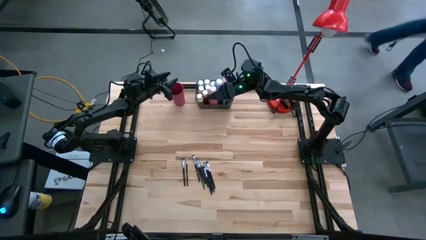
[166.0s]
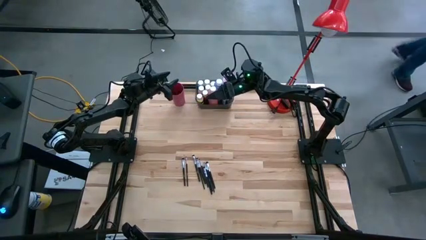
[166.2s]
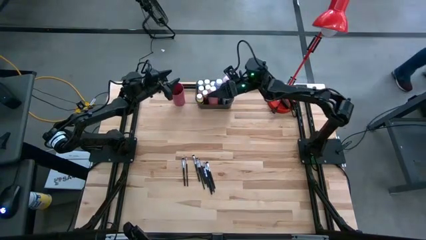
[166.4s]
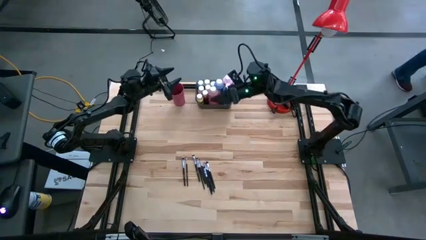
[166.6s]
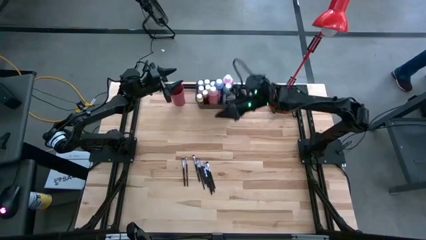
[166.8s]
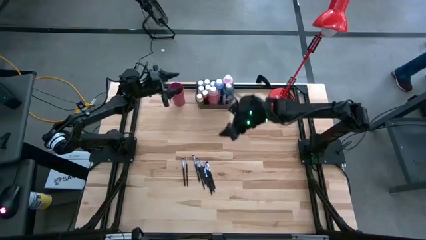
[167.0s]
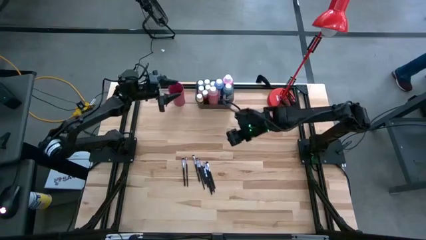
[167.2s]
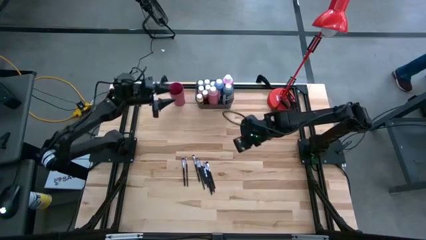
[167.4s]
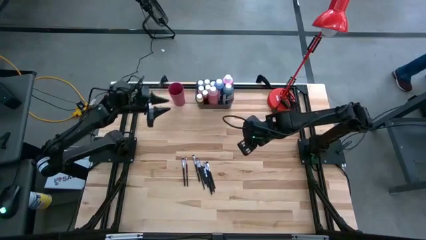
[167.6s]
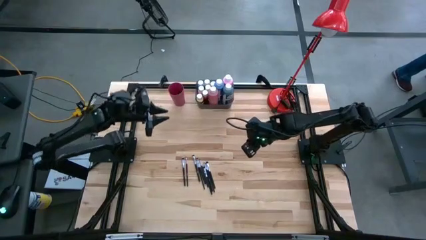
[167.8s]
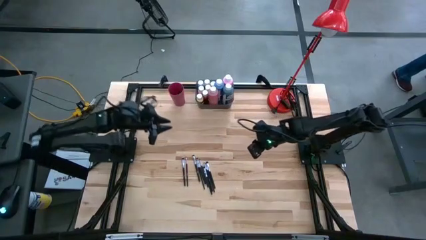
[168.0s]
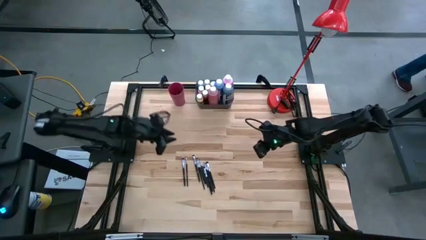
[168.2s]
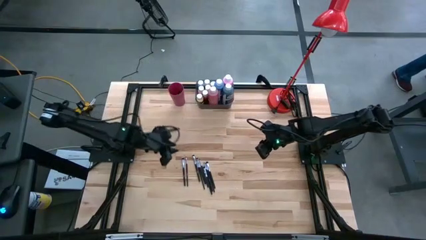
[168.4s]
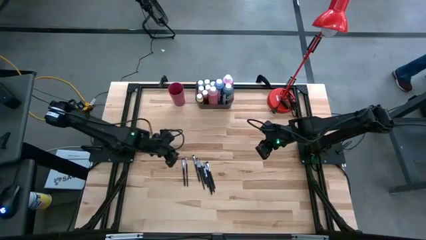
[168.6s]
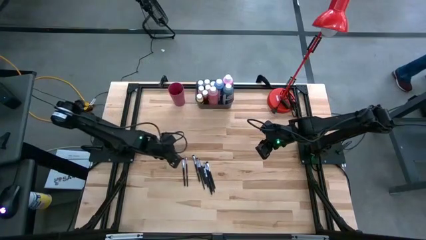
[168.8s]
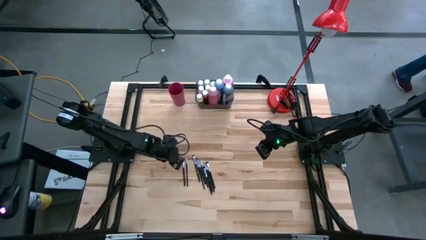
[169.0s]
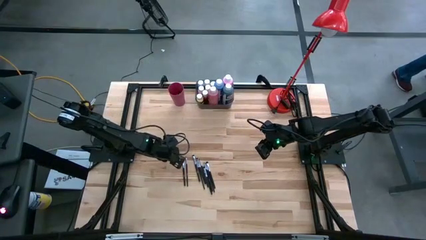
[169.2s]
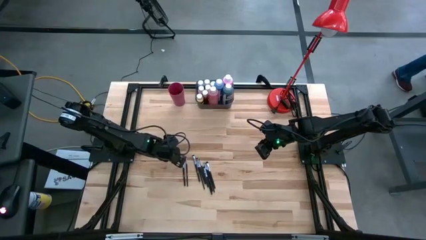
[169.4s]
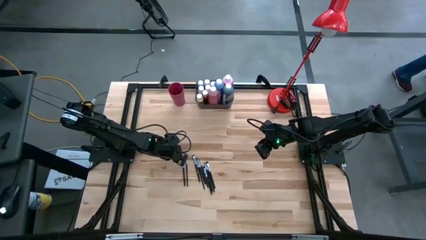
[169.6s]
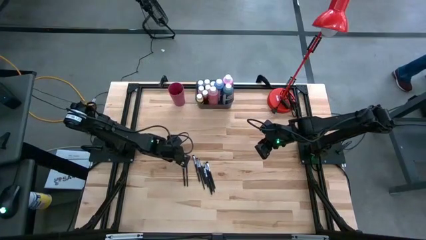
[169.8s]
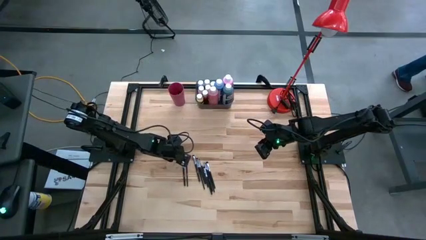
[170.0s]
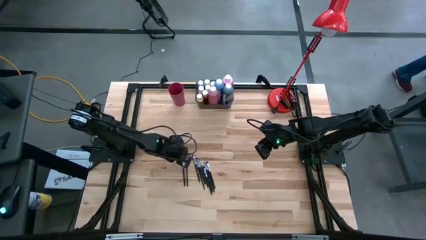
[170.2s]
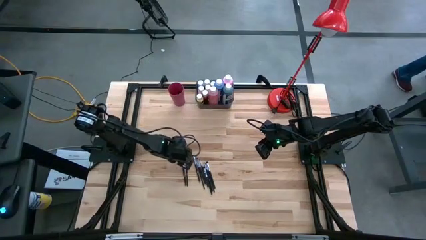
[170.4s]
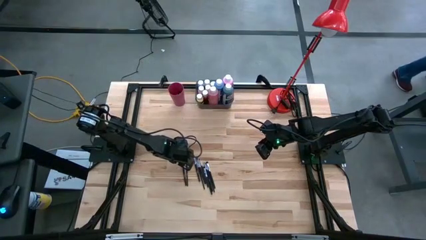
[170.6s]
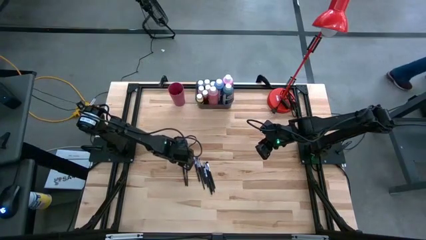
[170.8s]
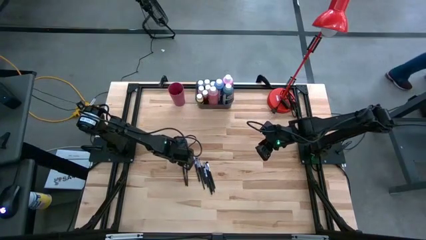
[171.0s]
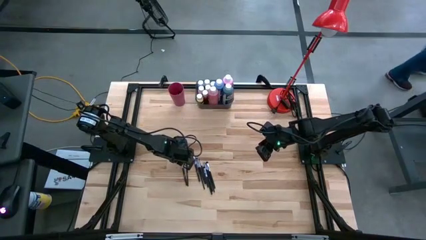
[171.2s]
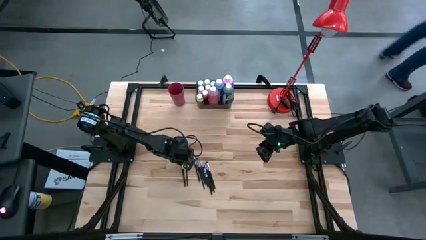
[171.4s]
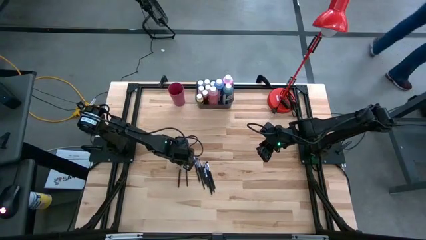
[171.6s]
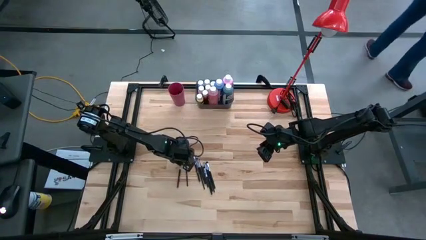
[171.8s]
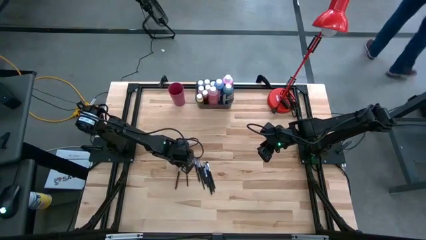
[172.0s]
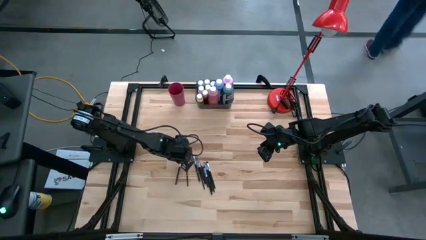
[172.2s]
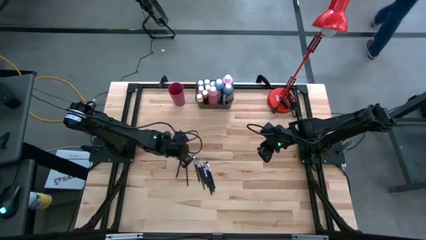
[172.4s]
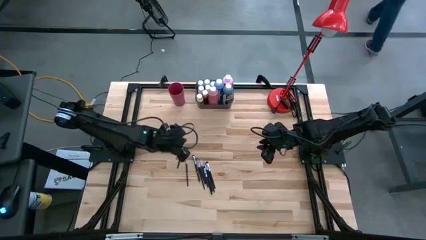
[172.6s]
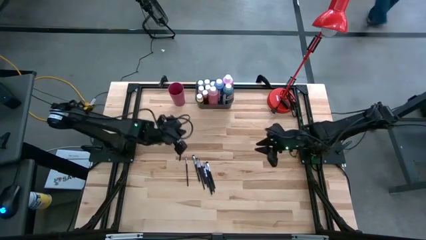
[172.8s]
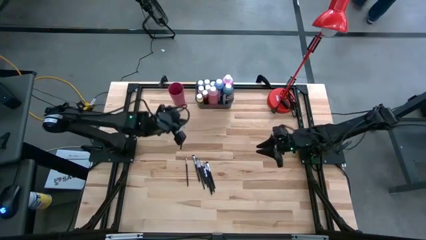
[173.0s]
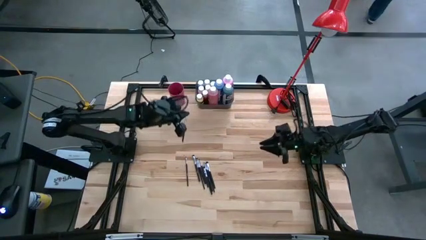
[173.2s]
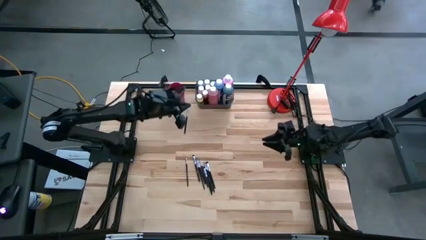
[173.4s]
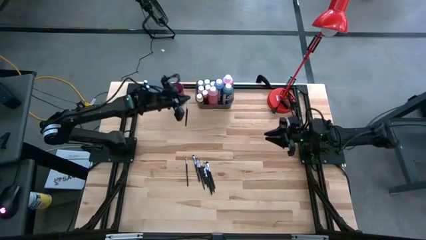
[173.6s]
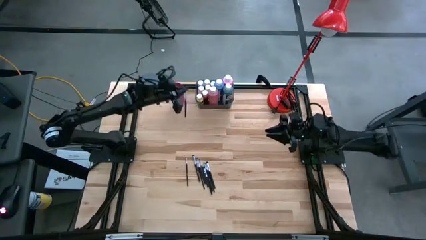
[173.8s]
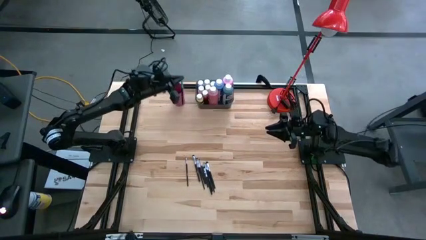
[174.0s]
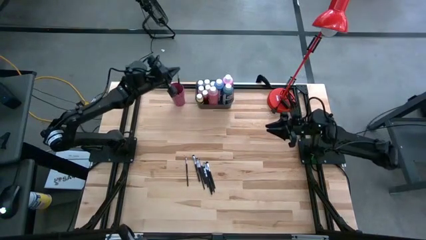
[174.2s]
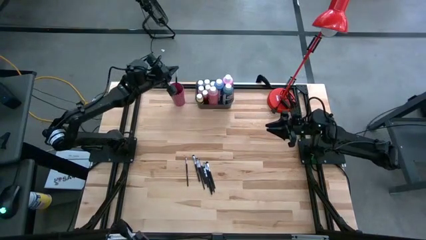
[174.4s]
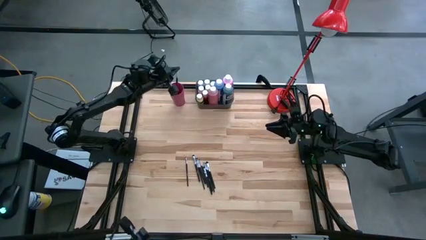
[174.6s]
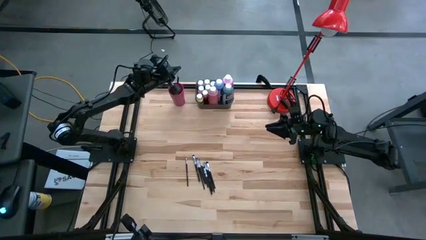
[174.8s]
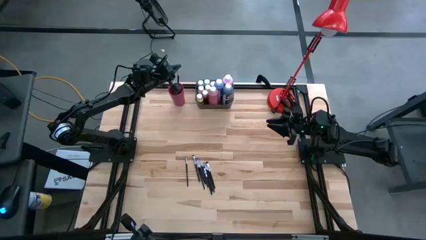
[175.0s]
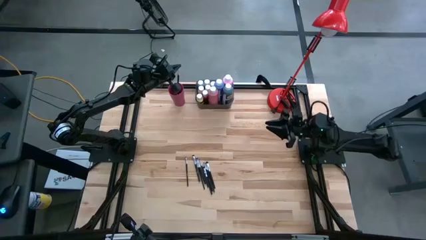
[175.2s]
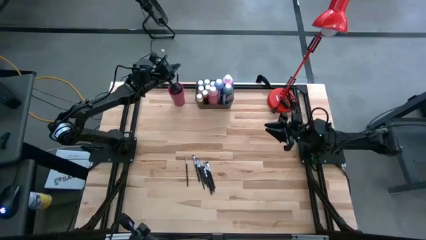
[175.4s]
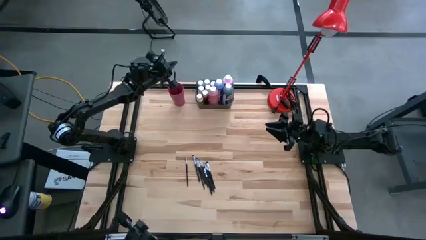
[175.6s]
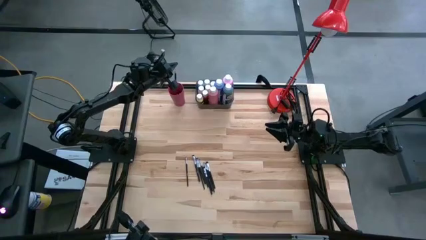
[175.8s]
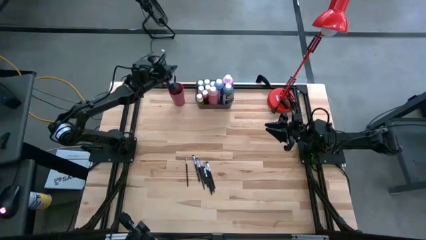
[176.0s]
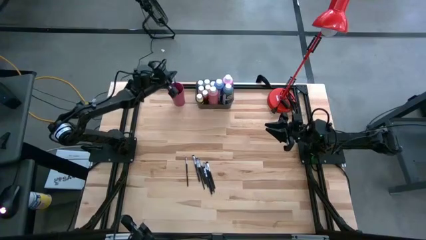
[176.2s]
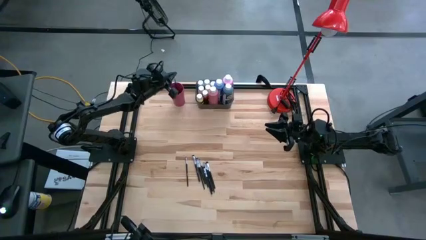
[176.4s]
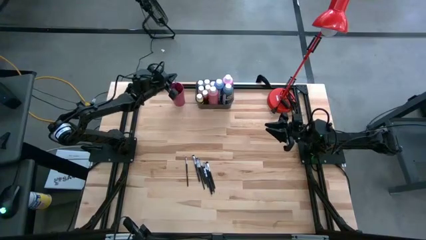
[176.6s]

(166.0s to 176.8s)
Task: Pick & Place Paint Supplies
Put the black paint brush into the pink cup

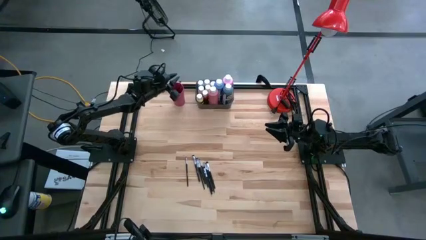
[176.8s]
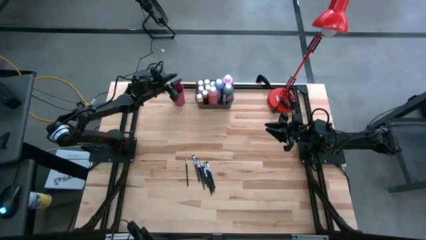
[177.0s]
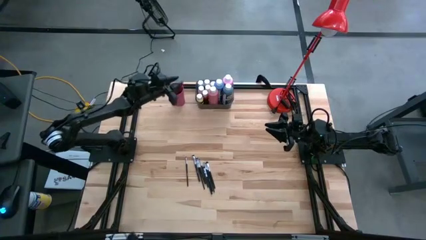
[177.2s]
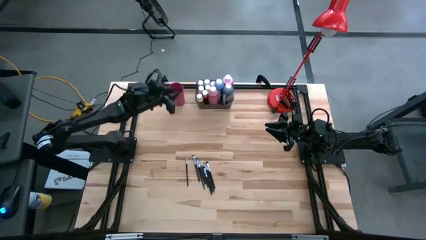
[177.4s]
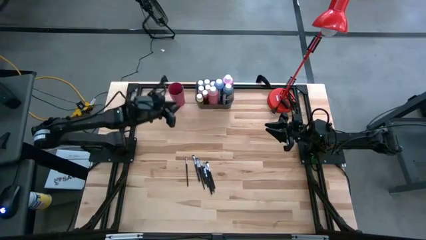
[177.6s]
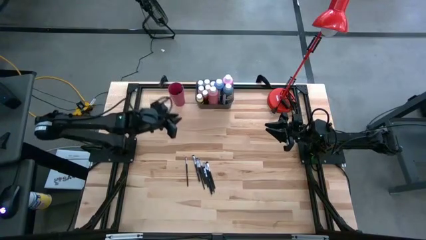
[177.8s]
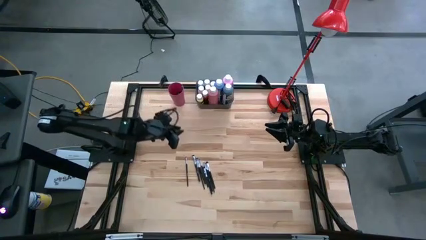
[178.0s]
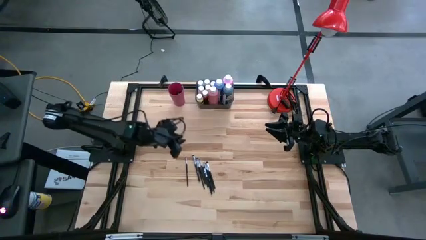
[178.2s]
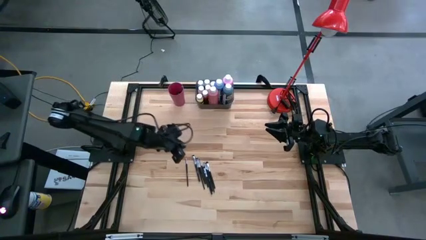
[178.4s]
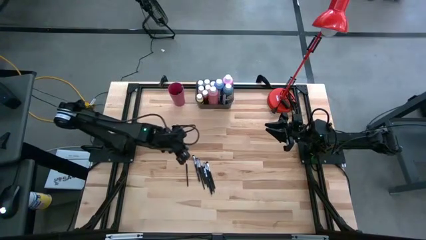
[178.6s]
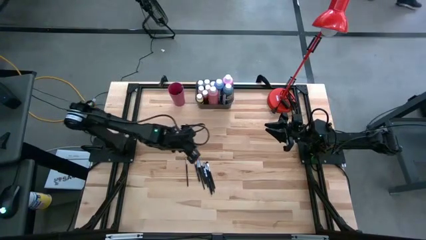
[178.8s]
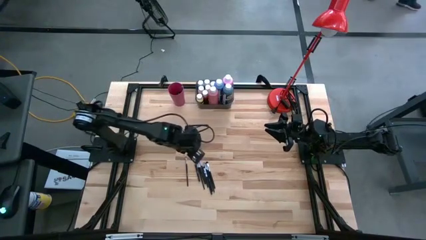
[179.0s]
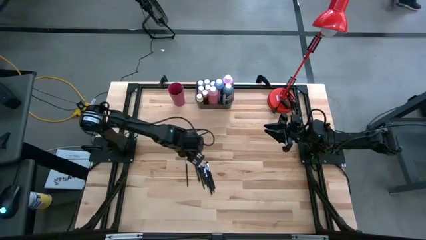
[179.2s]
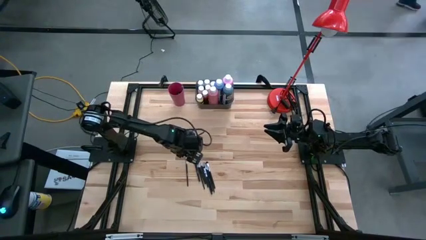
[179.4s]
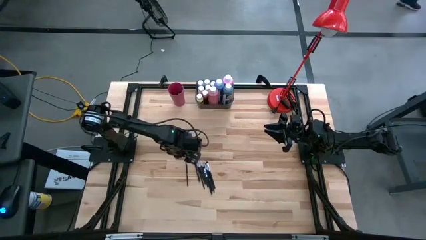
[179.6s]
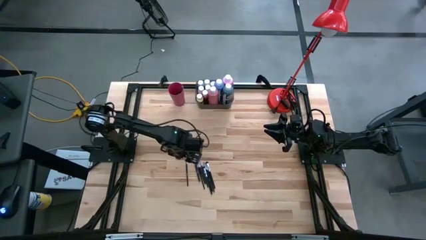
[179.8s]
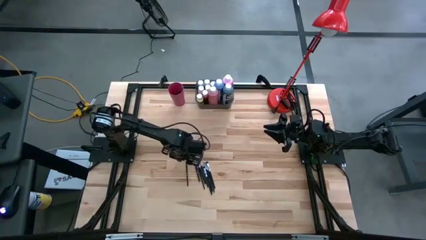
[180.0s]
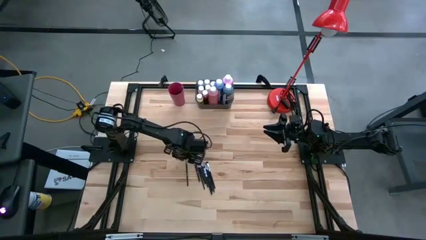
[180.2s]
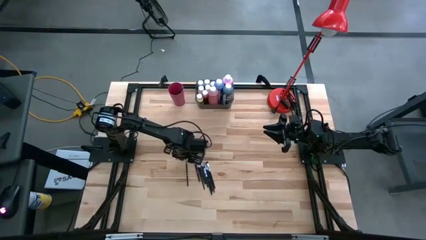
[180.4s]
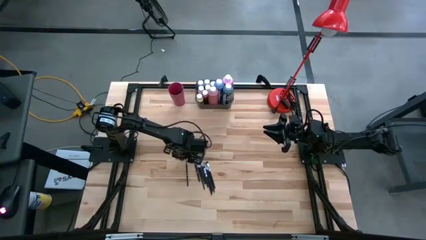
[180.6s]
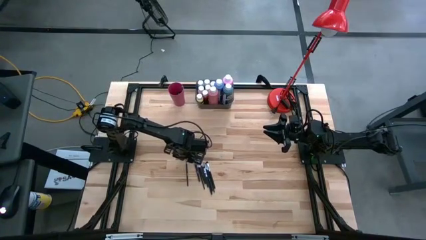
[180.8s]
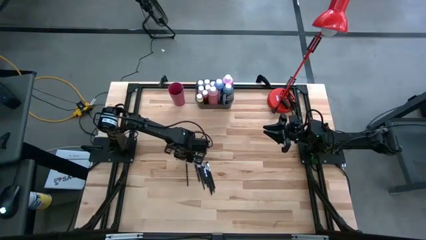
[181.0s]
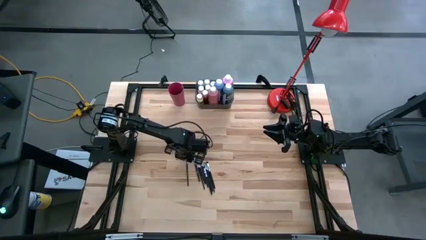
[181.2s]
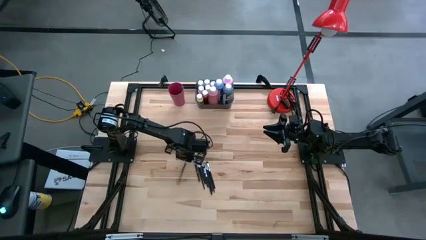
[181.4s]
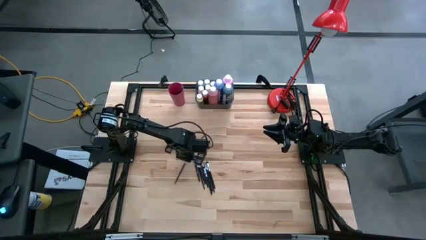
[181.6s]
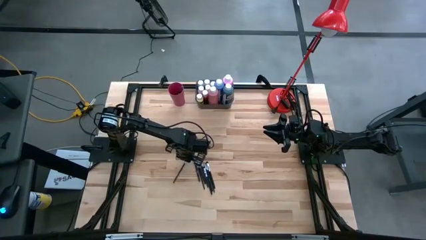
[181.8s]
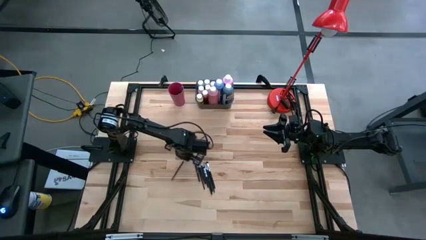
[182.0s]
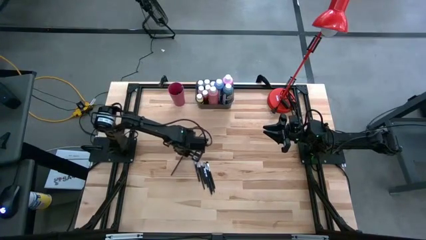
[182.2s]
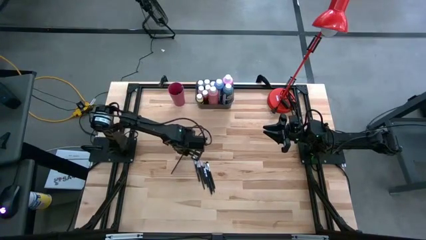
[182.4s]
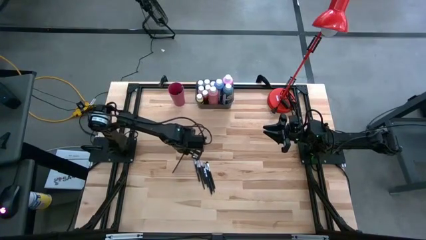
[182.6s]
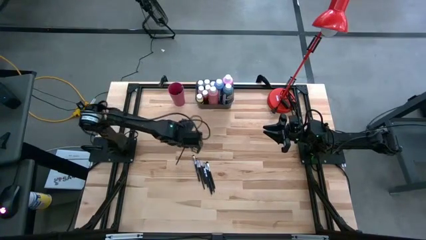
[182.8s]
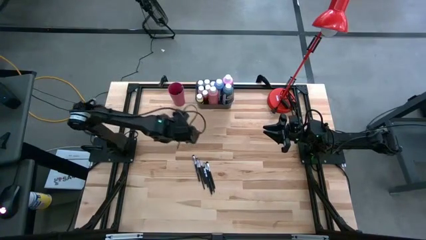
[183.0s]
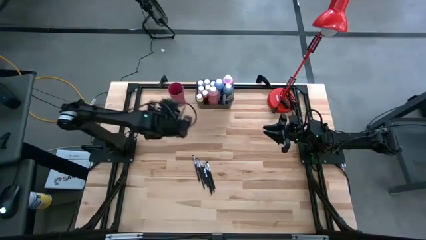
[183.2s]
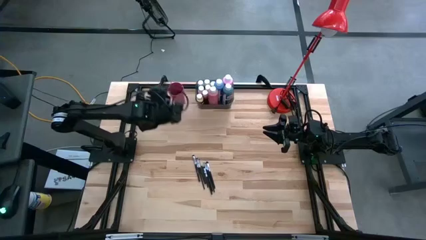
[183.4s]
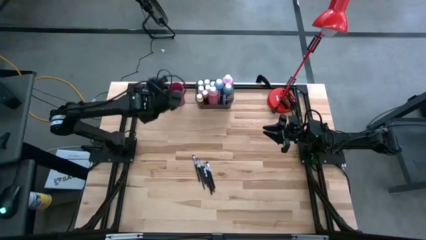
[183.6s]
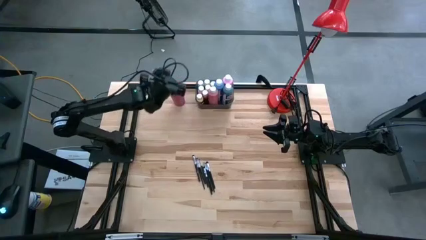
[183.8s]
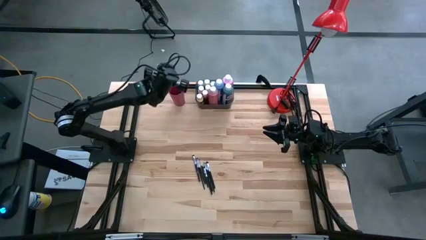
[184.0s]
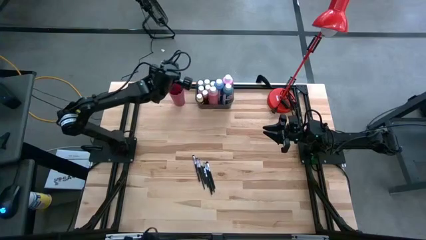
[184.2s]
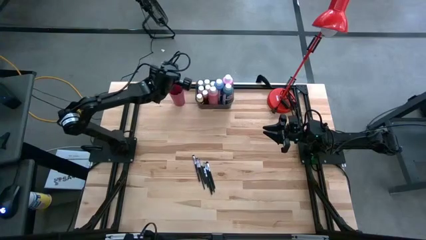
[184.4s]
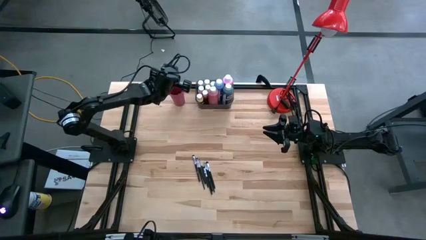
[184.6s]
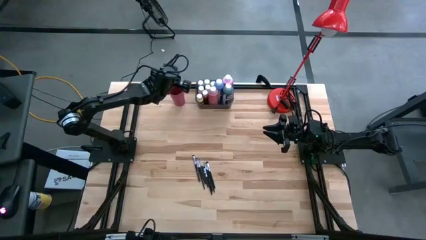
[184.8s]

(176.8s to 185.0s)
Put the black paint brush into the pink cup
